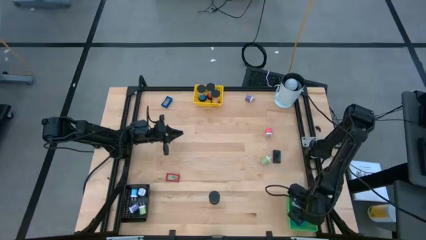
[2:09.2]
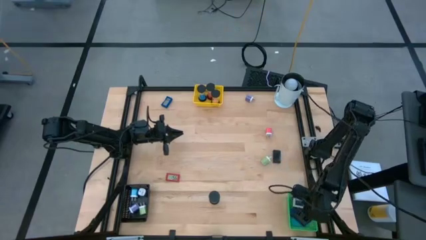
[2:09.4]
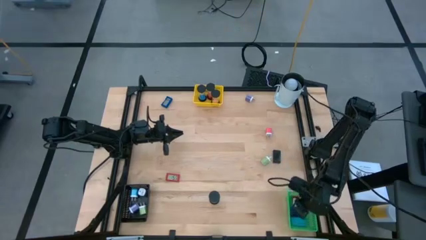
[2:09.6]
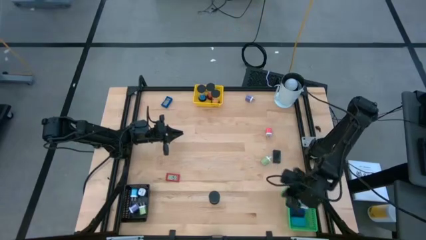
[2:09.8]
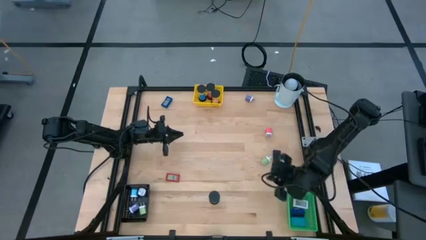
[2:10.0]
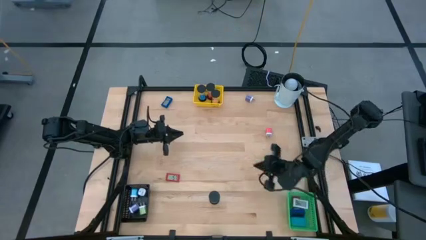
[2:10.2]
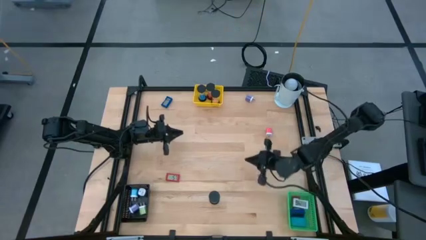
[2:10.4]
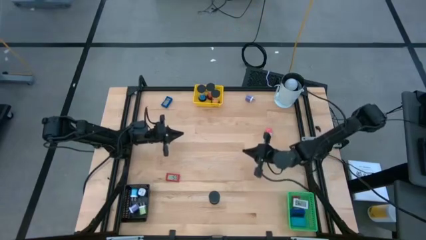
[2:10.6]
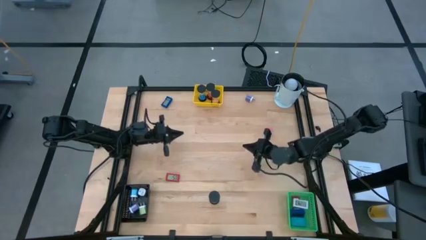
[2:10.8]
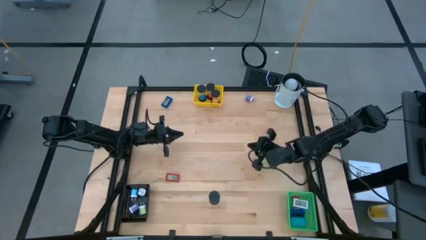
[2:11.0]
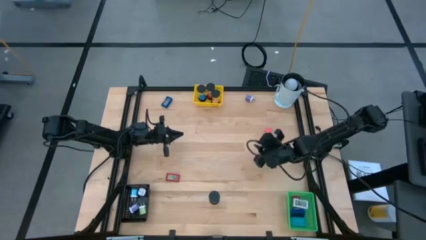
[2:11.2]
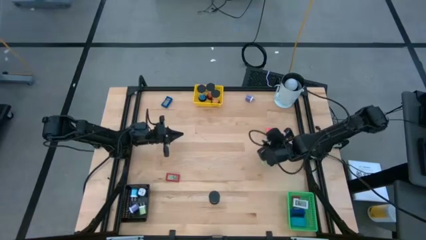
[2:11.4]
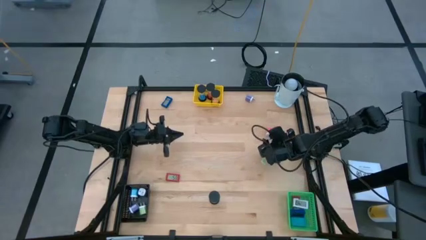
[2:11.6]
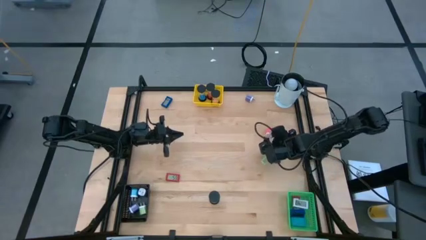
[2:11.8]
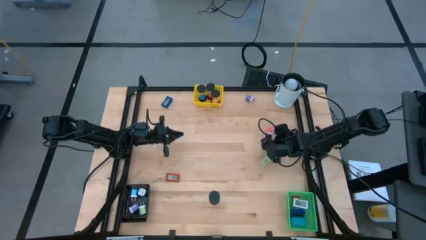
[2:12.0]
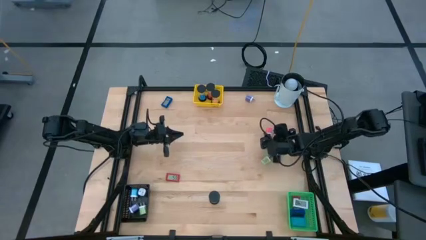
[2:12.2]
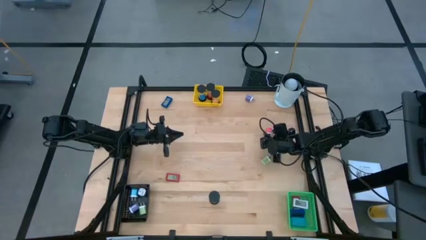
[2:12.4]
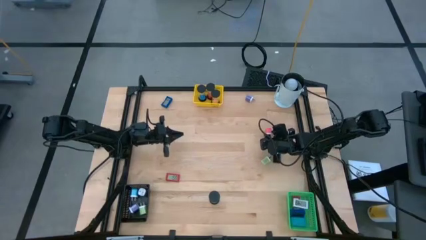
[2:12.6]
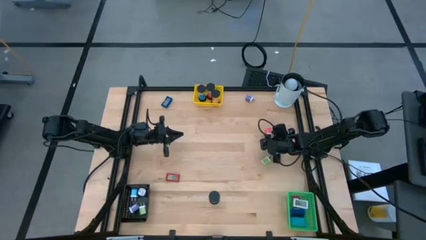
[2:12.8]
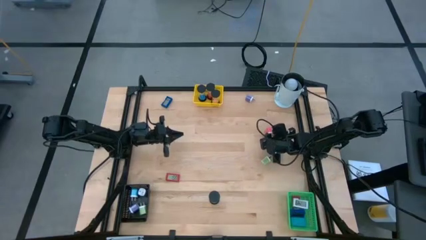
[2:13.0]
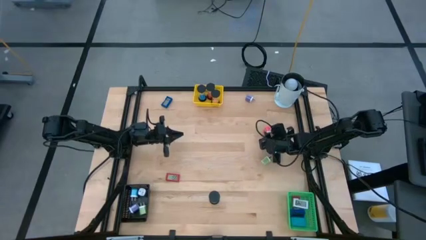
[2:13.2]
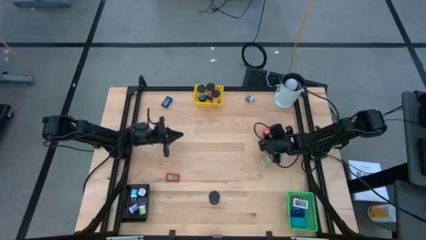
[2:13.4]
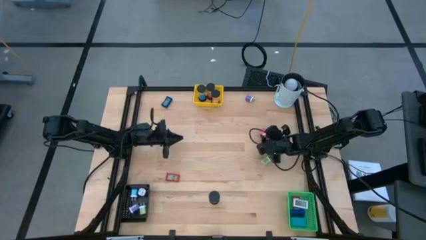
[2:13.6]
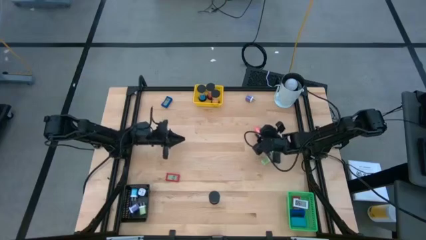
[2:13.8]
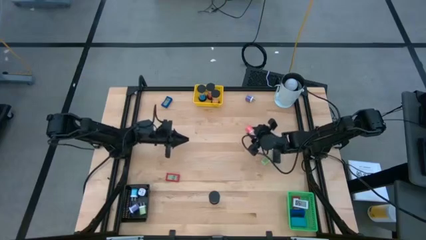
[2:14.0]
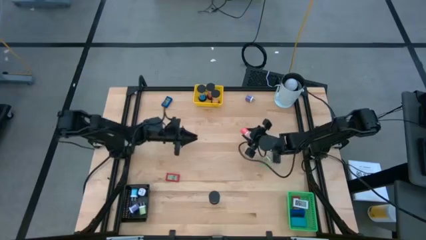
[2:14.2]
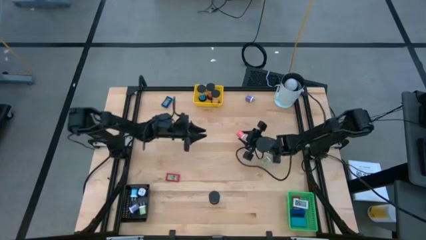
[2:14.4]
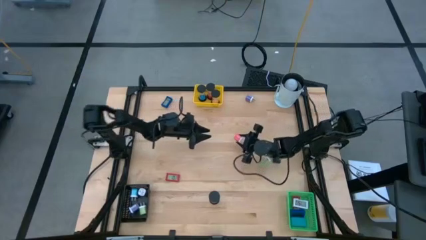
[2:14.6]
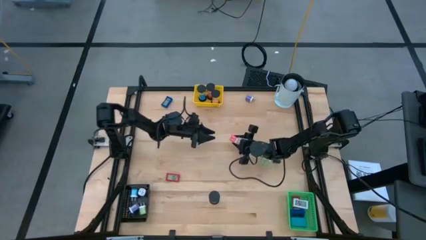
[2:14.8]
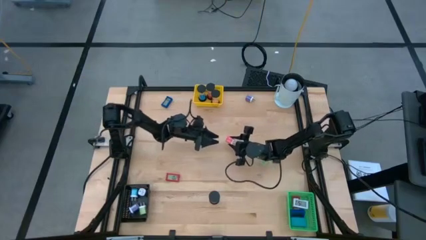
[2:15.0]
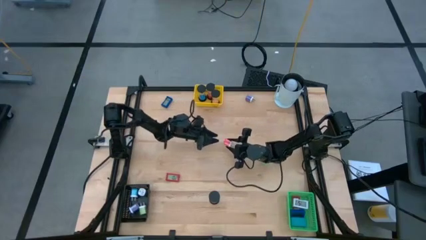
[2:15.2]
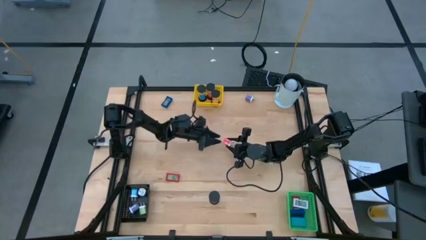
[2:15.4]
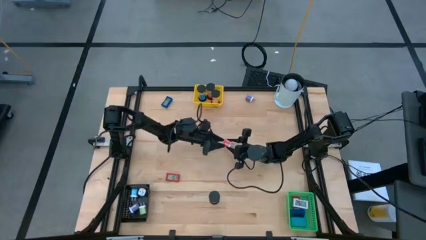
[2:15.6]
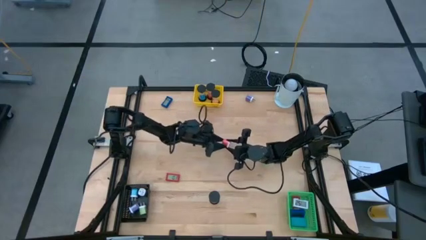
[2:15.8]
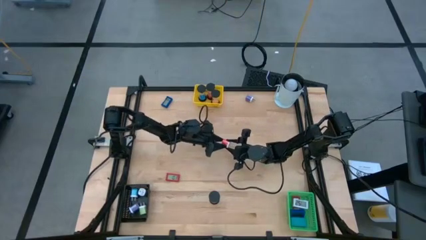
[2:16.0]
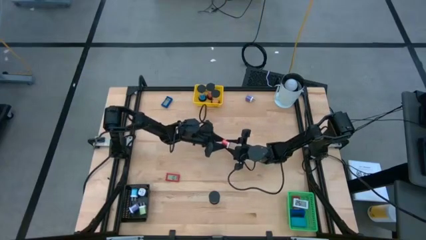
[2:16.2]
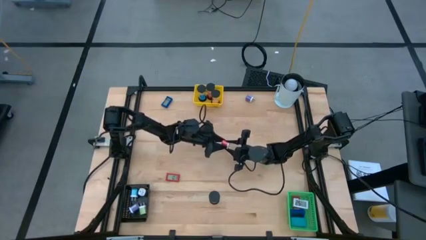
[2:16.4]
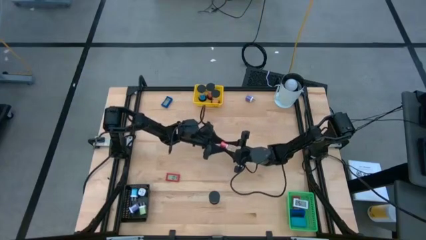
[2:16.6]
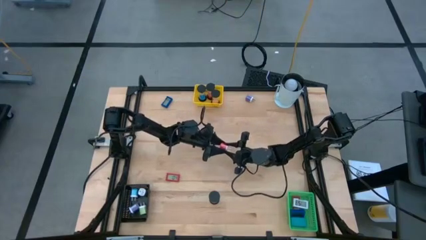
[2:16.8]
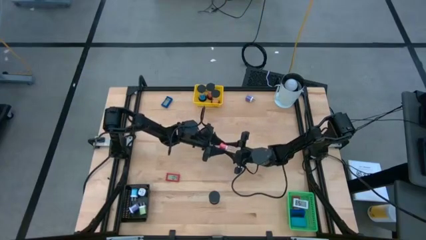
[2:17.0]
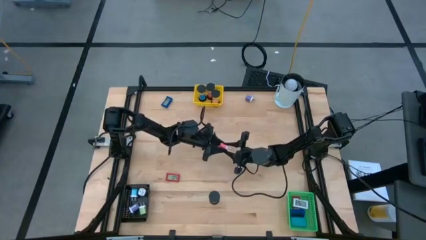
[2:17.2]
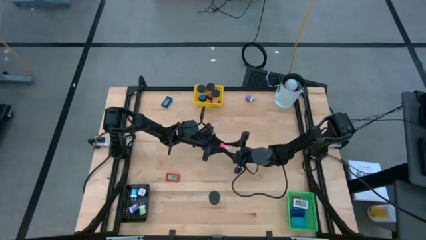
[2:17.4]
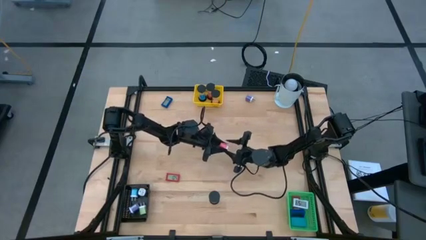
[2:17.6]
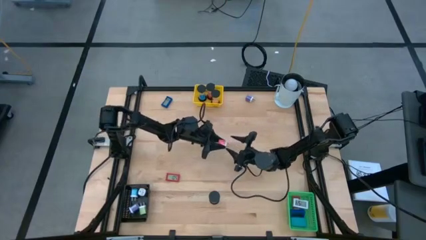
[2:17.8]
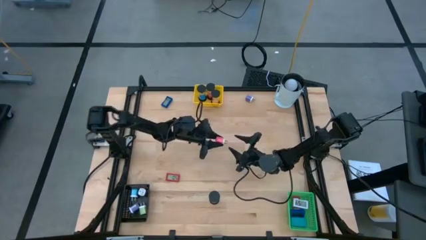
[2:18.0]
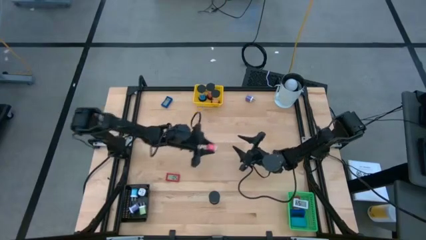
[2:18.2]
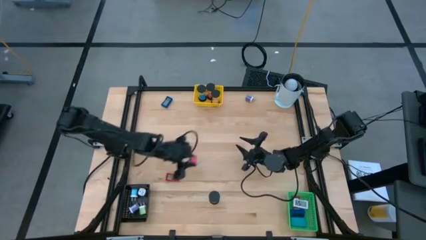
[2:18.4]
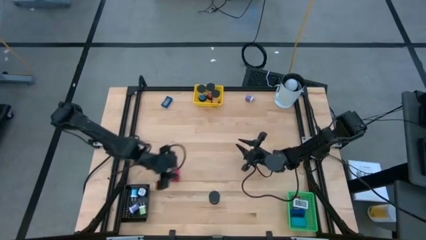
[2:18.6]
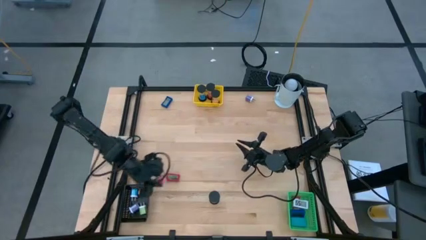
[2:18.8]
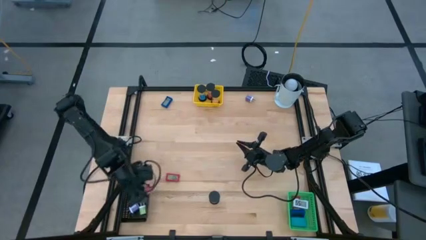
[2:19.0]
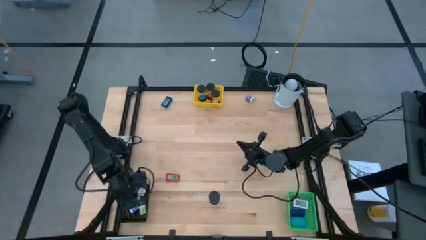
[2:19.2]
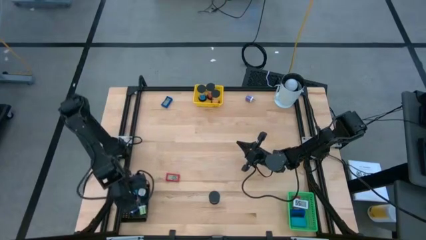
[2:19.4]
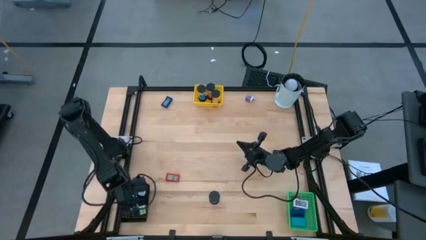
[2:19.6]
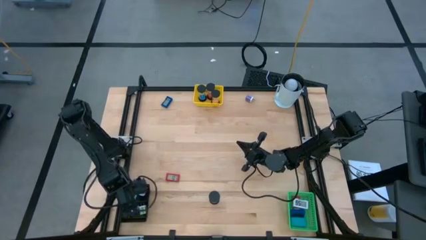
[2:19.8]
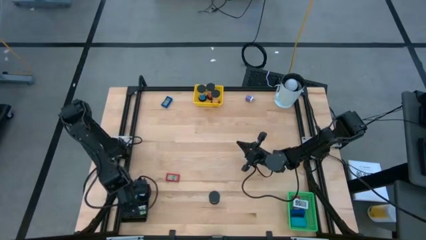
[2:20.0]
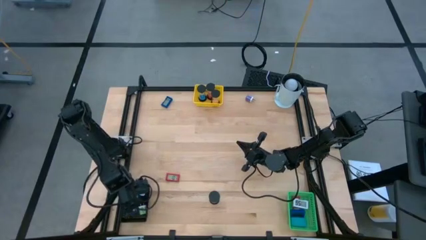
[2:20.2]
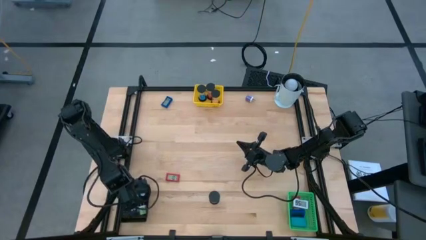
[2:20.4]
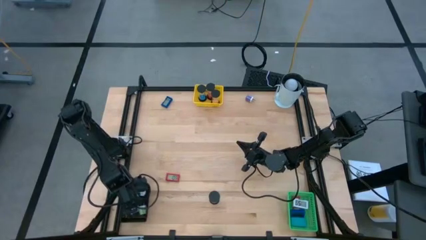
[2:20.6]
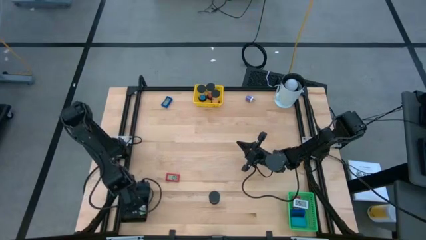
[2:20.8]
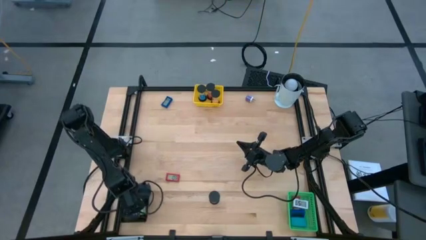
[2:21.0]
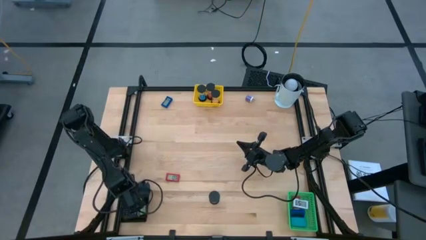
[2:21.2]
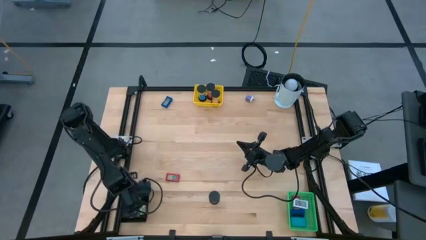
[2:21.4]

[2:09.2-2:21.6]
Task: Pick & Place Office items
Put the pink charger adapter into the black bin

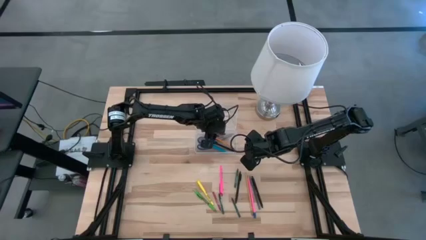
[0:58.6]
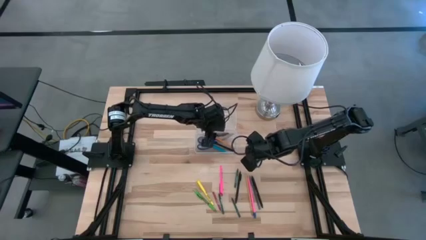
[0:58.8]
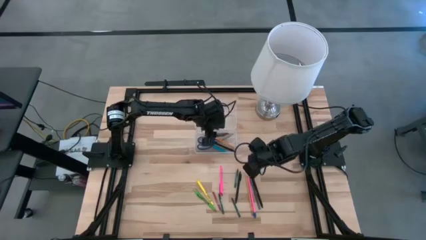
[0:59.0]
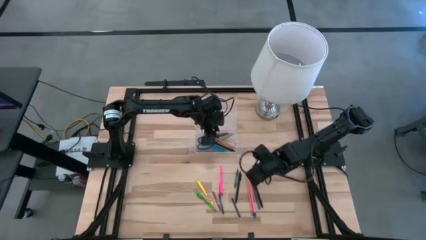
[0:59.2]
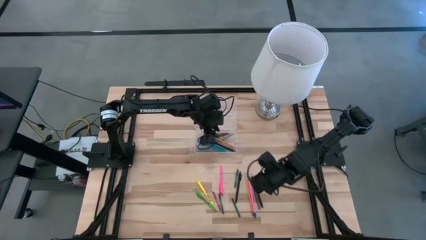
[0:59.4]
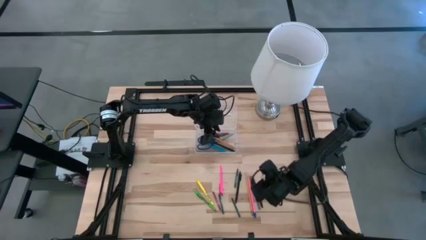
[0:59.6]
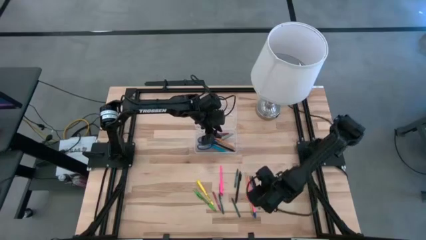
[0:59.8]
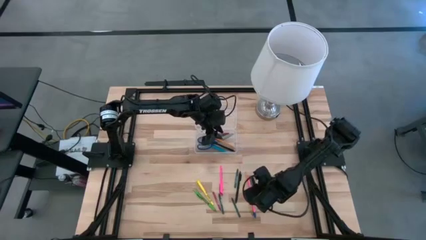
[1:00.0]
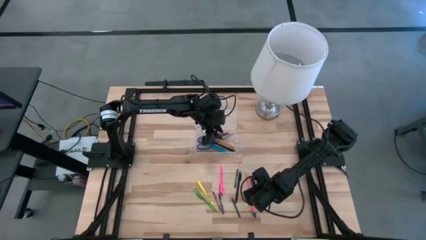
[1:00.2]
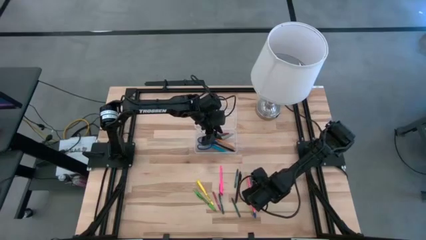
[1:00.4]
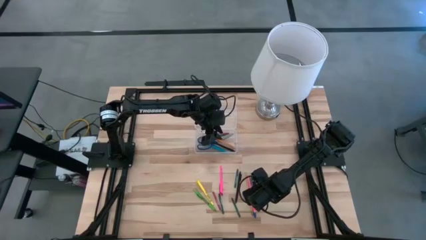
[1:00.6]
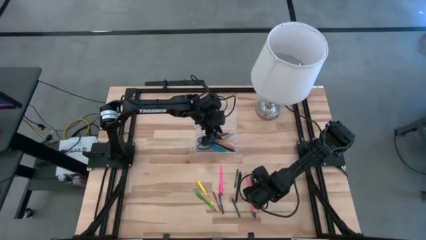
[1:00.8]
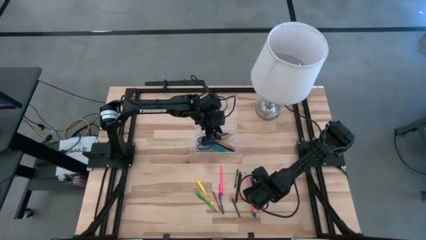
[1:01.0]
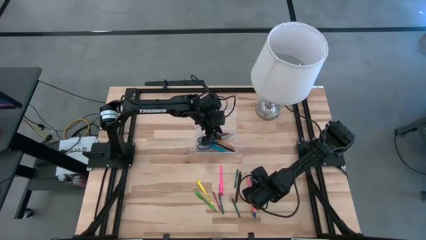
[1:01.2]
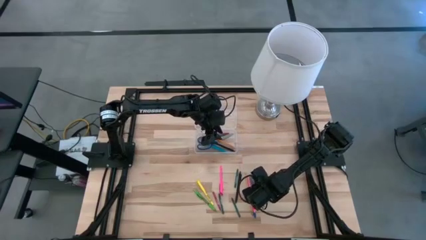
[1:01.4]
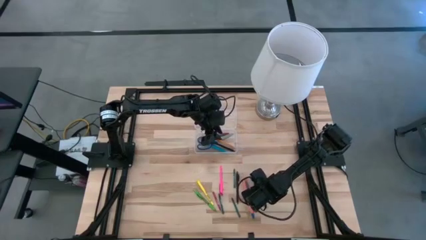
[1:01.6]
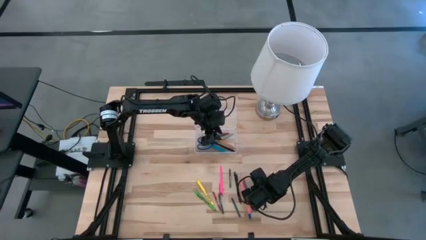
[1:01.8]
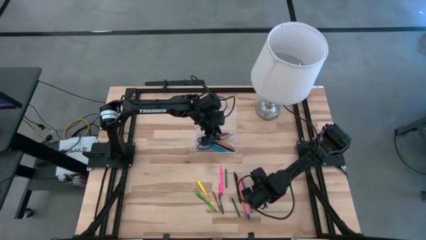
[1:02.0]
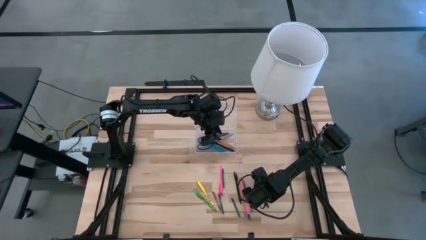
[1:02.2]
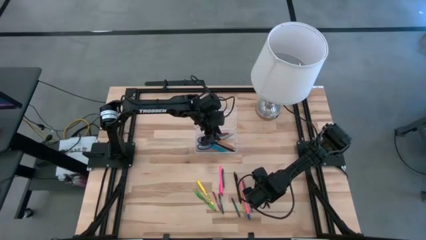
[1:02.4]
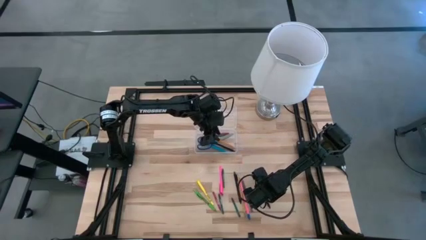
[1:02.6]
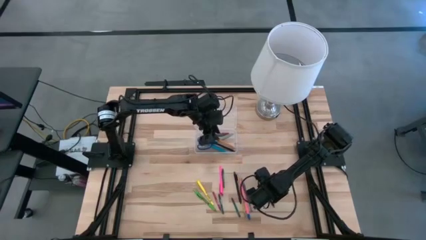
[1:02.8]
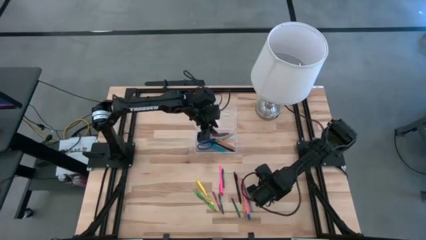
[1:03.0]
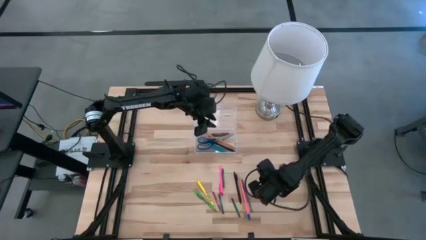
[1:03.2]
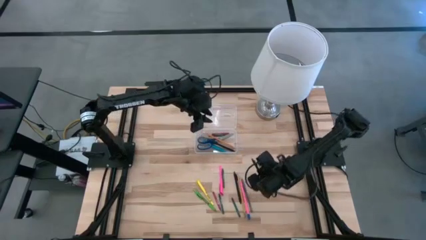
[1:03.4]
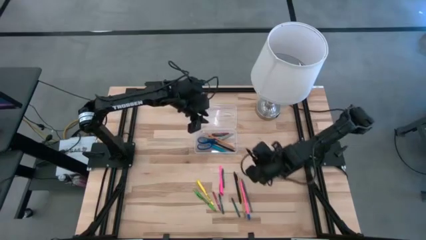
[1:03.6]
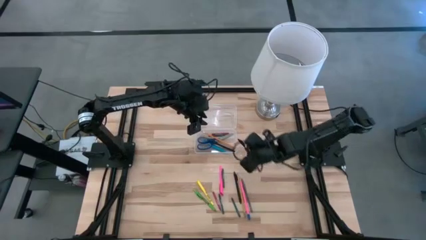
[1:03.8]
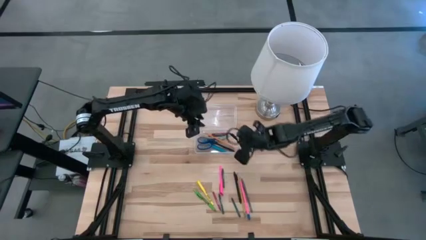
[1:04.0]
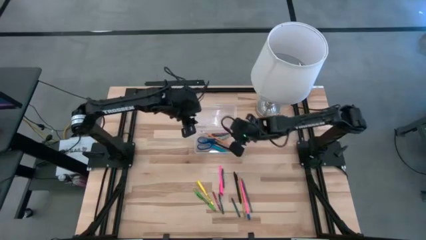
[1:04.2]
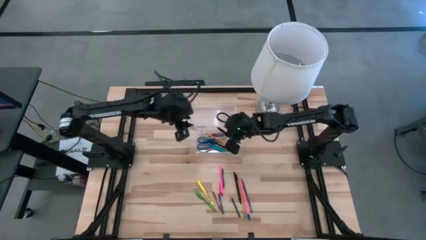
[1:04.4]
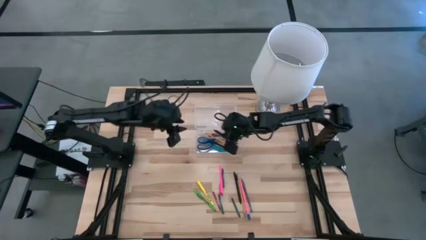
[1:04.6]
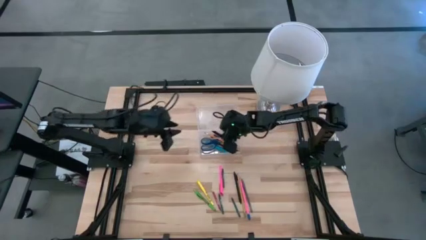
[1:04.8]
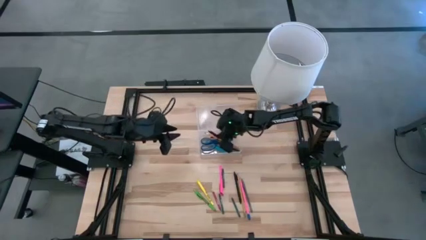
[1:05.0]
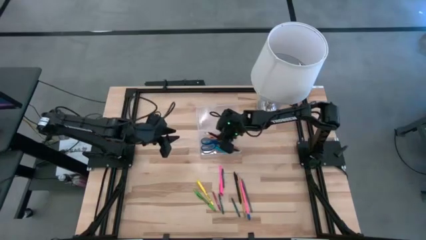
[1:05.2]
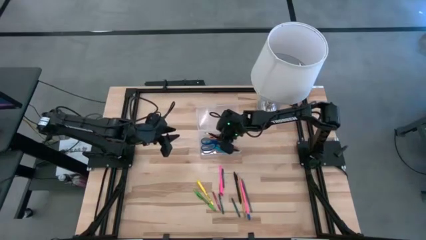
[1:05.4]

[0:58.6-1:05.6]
Task: Pick & place school supplies into a supply box
Put the black pen into the transparent supply box
